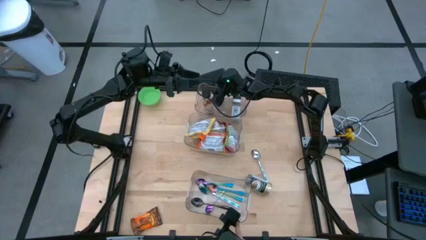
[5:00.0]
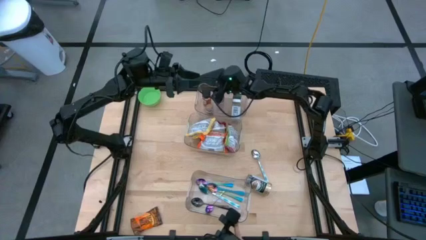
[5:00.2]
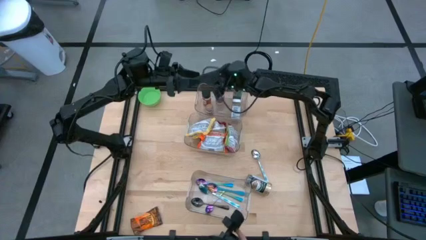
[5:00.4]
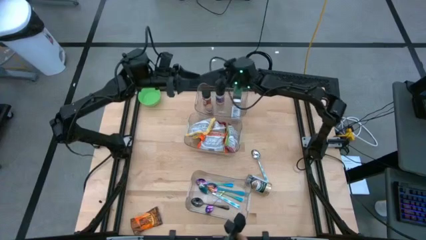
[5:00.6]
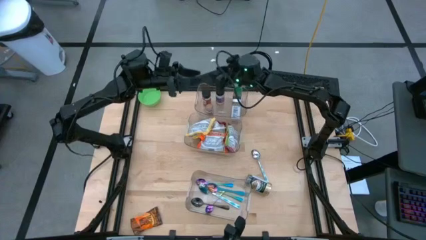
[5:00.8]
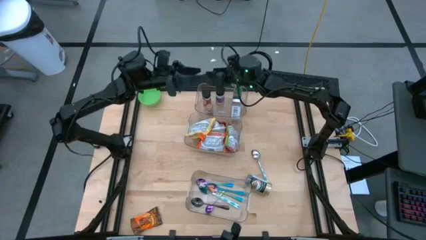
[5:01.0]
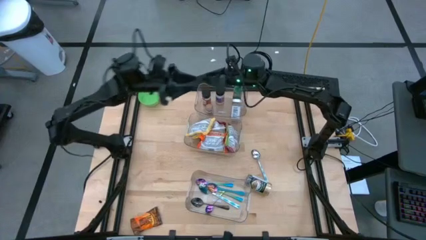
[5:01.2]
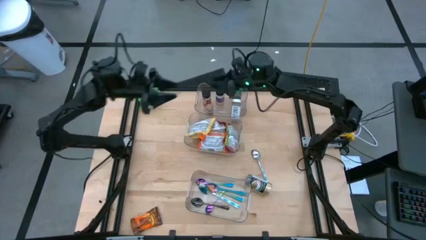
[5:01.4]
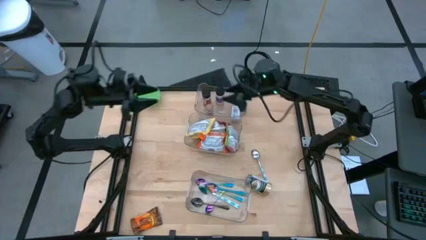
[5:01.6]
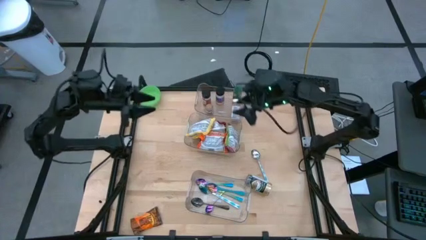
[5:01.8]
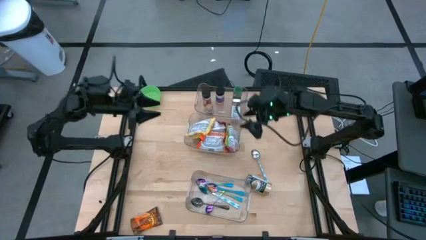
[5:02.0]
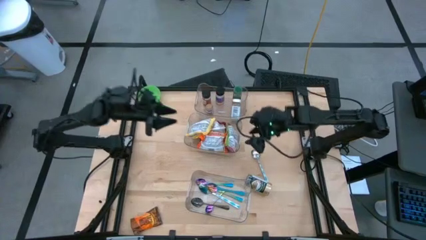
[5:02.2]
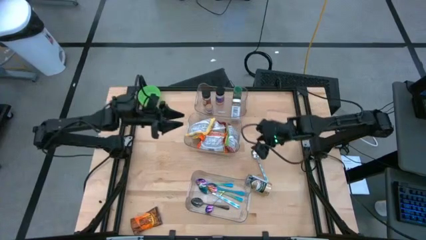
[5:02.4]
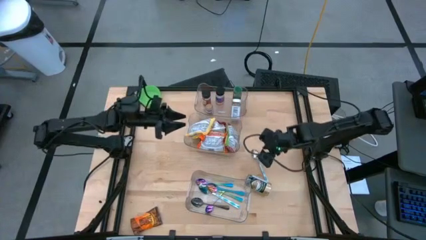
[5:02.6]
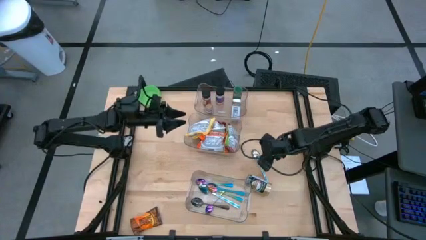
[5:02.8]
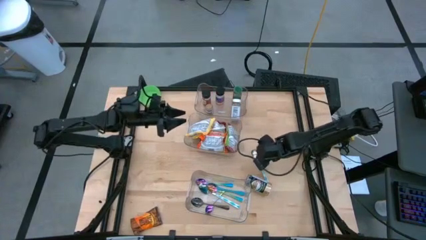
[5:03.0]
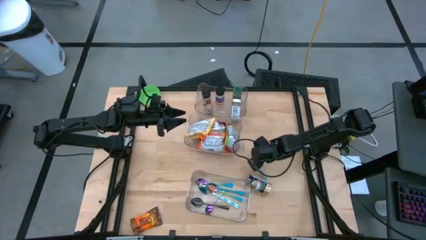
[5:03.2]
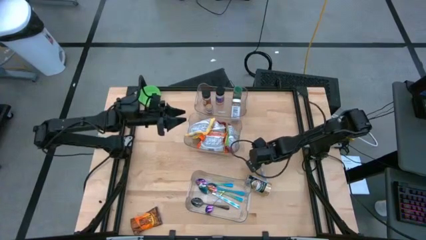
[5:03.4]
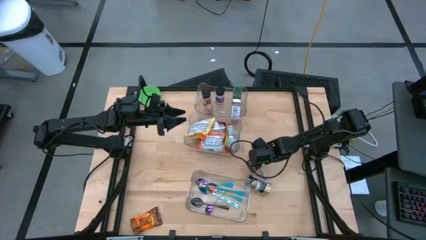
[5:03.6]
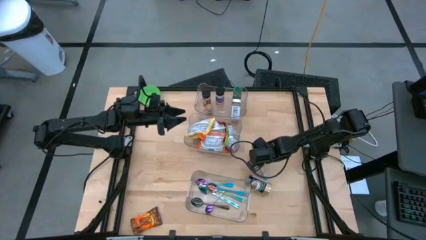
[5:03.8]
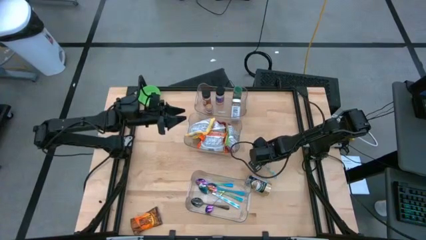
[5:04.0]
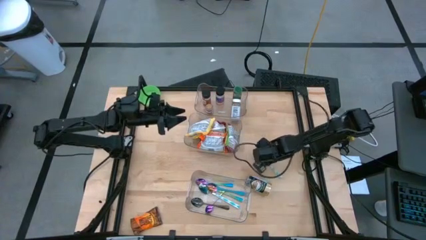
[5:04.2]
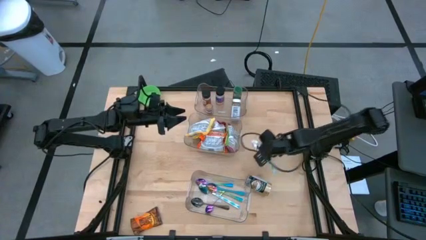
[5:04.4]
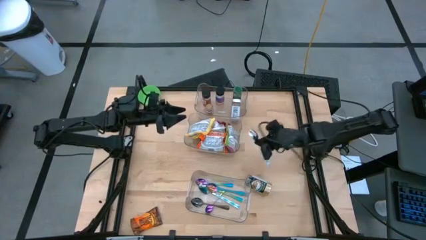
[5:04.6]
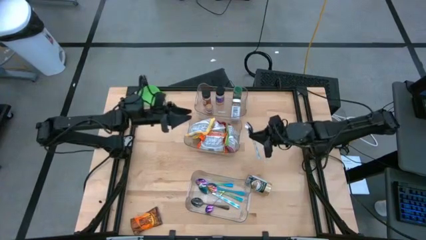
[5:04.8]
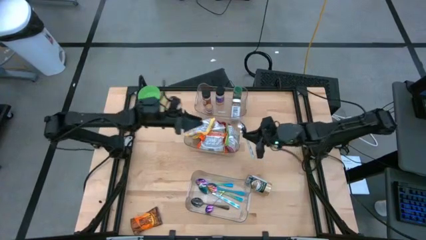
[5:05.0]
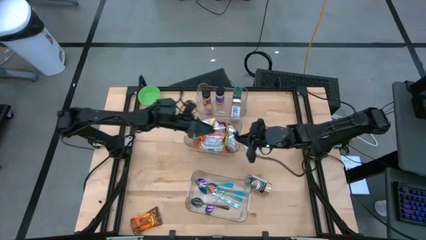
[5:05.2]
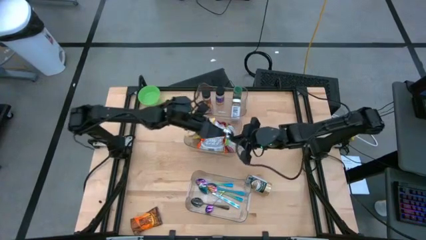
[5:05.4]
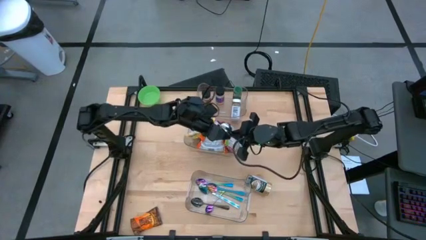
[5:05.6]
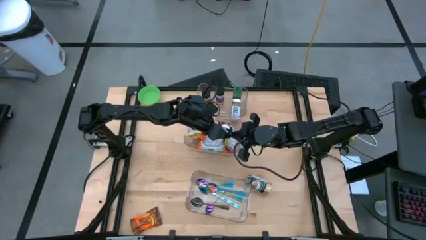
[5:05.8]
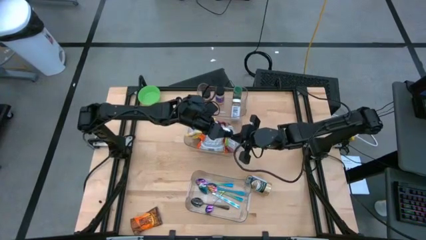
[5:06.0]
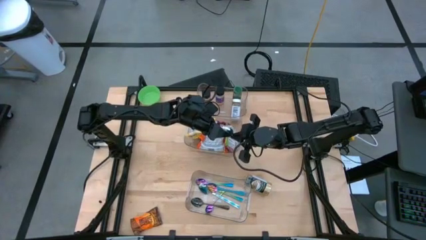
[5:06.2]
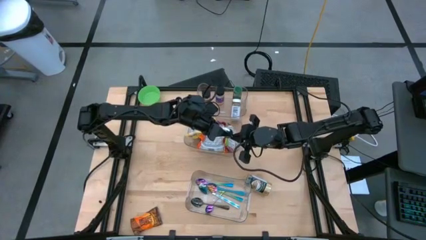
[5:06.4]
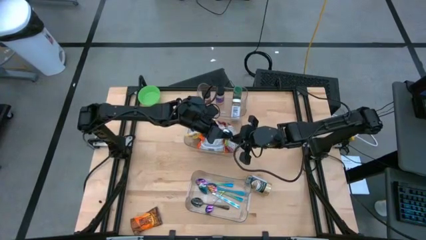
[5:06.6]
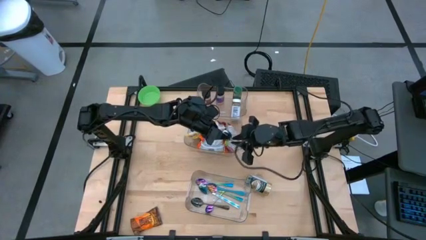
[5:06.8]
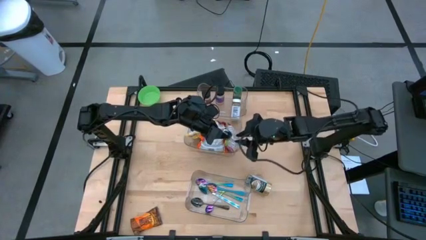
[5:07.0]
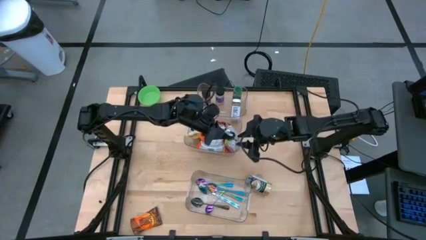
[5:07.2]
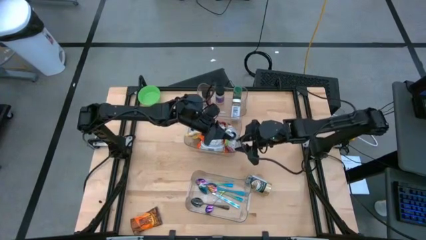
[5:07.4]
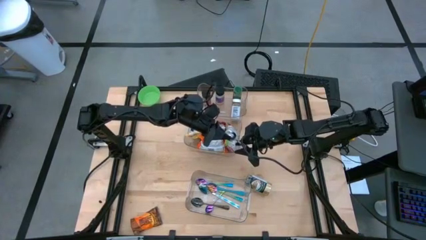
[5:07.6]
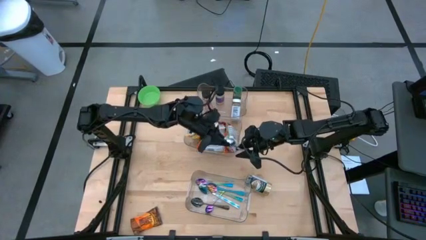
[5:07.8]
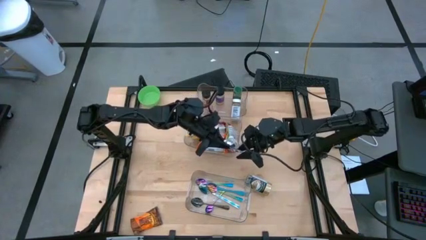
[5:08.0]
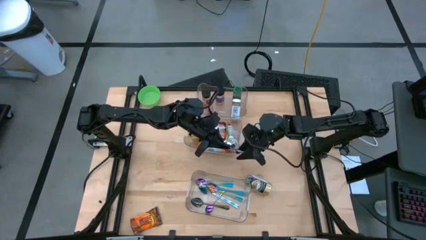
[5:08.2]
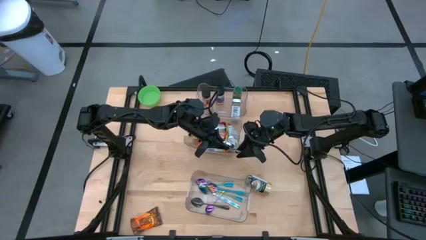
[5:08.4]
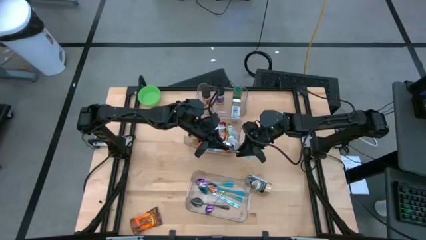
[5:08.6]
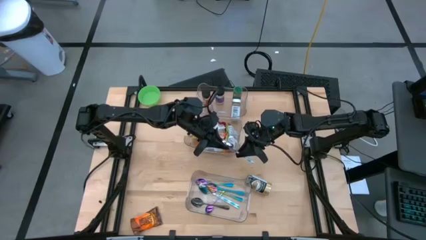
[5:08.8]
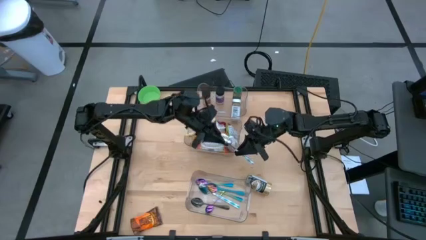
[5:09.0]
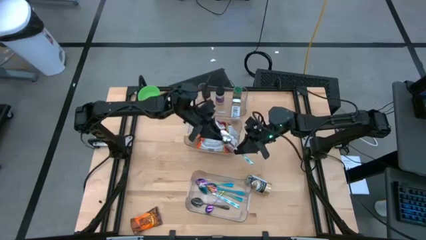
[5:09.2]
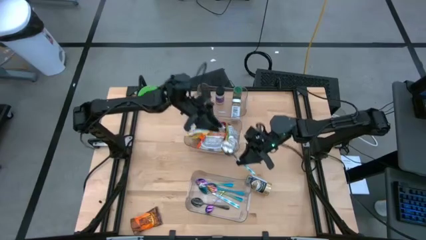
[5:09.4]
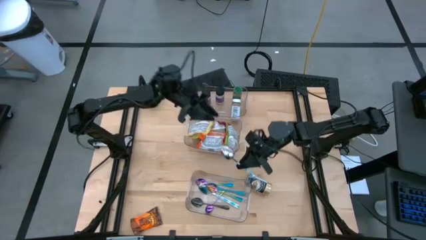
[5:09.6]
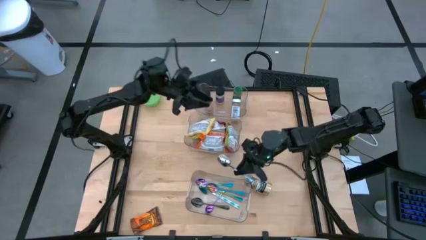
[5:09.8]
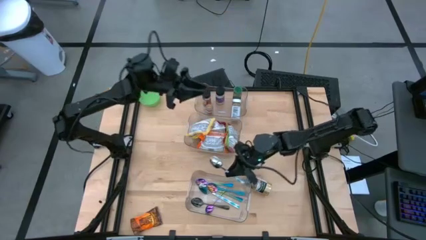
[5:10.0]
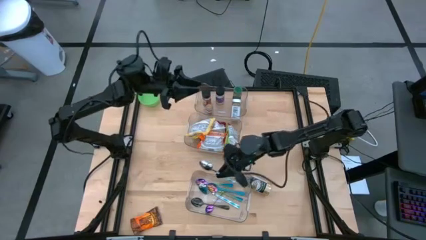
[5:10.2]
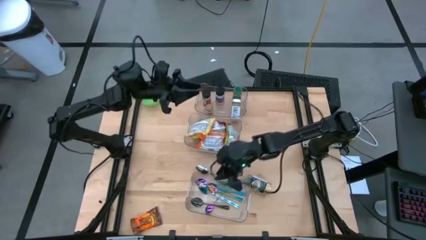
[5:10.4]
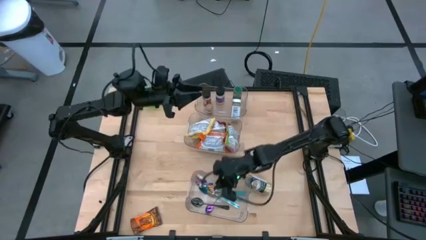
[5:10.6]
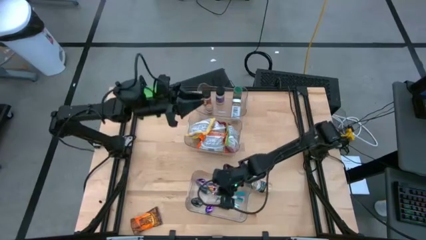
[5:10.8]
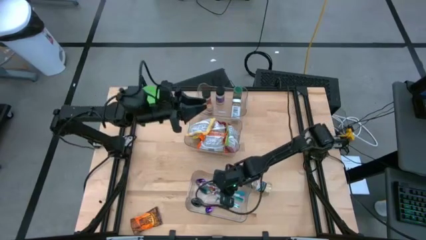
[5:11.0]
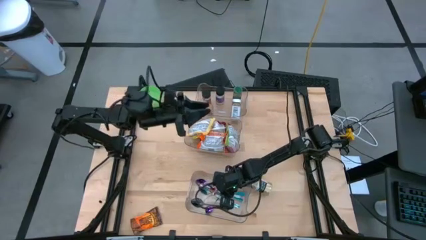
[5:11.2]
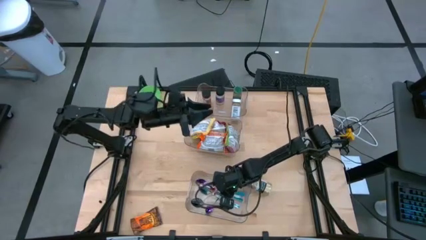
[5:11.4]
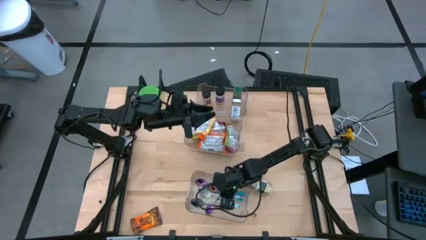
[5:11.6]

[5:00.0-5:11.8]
Task: Pick & Place Food Item
Put the blue spoon into the bottom transparent bin
